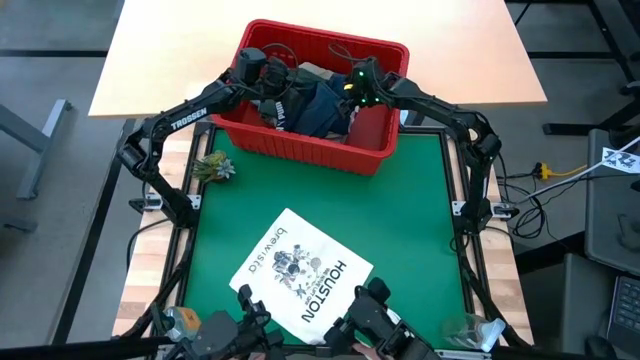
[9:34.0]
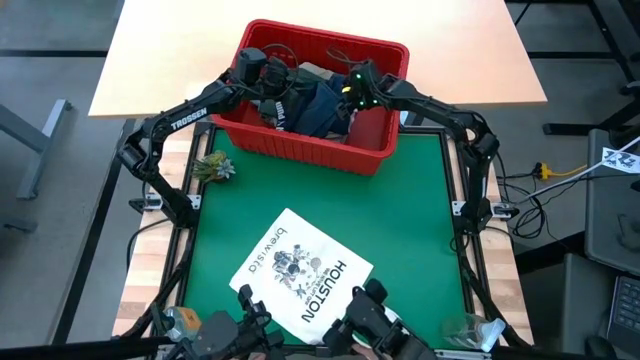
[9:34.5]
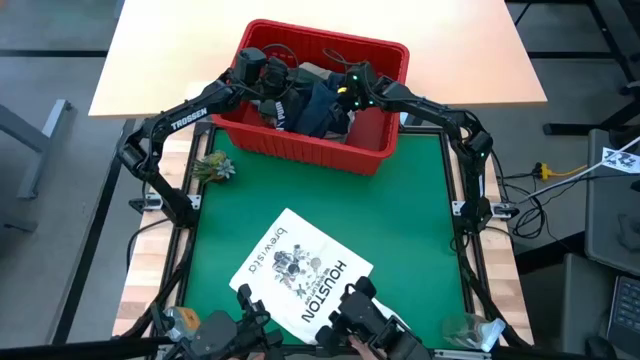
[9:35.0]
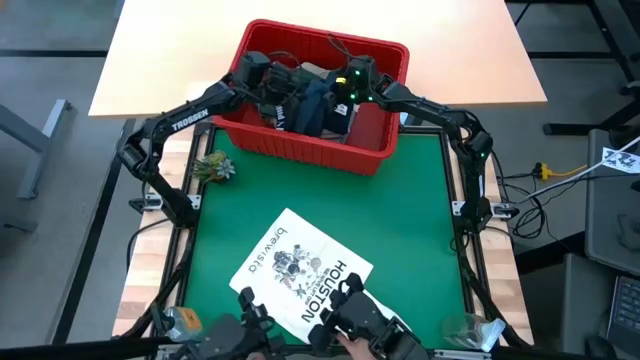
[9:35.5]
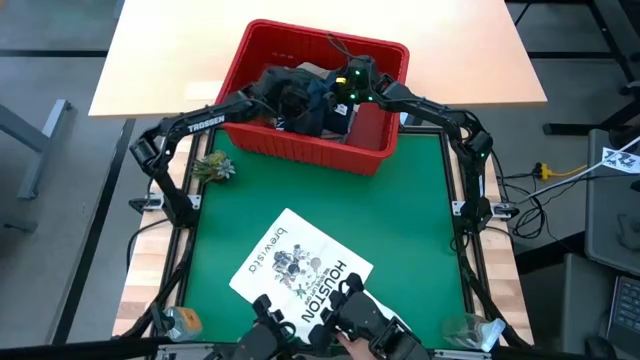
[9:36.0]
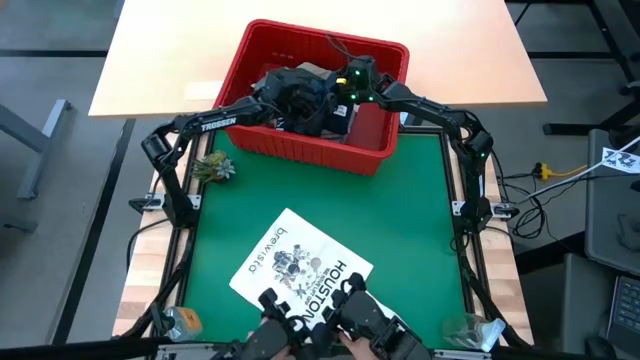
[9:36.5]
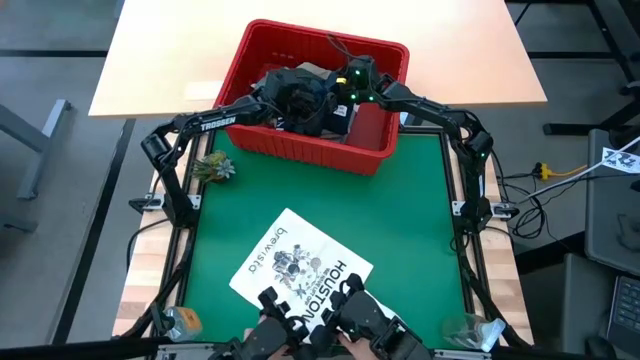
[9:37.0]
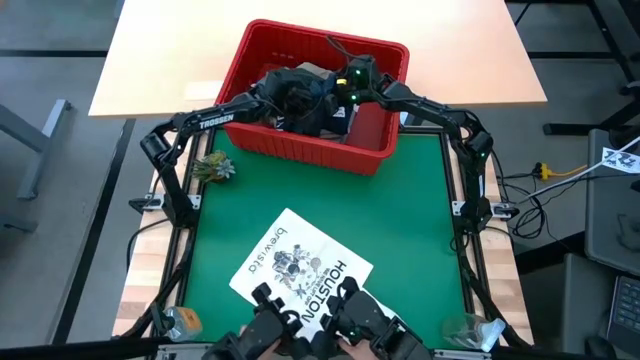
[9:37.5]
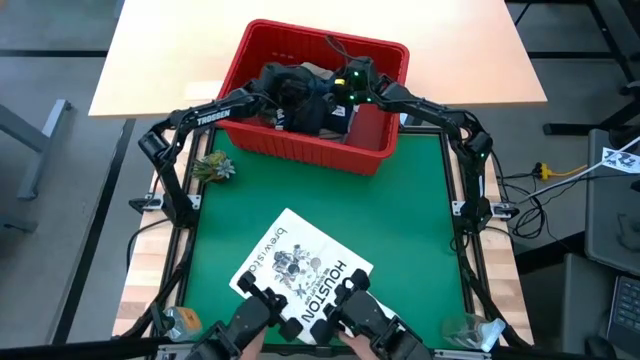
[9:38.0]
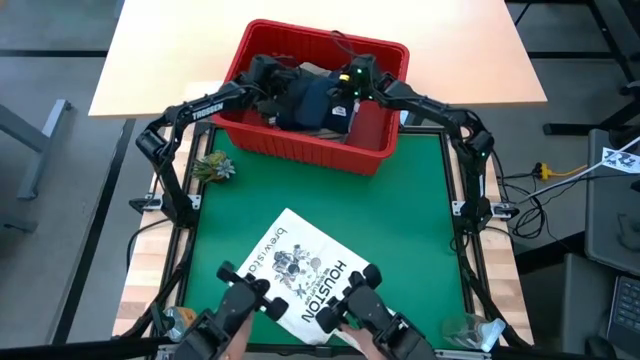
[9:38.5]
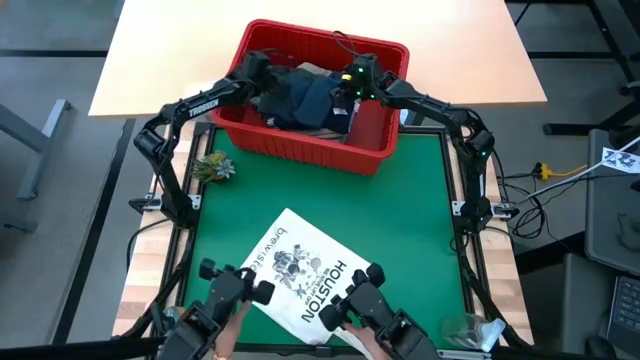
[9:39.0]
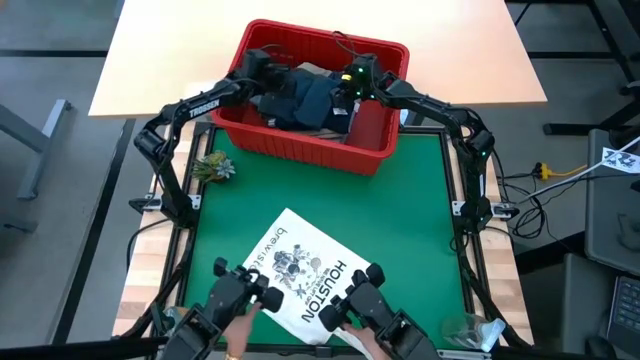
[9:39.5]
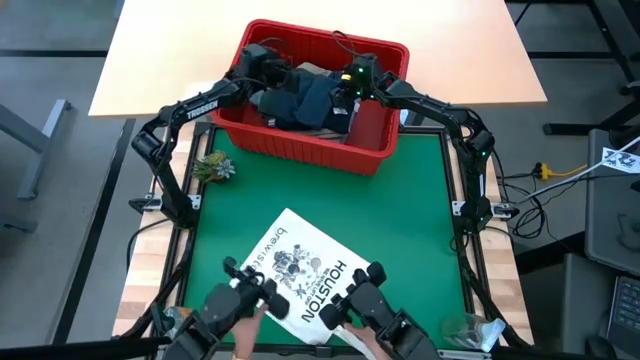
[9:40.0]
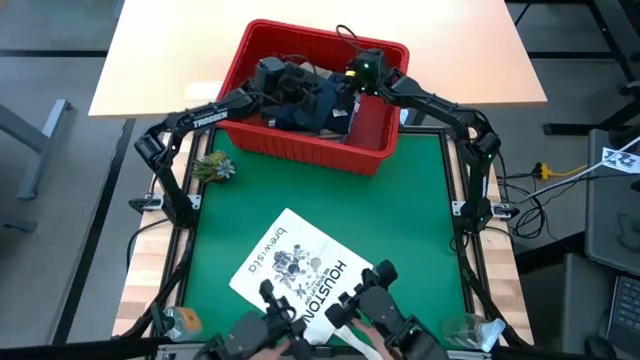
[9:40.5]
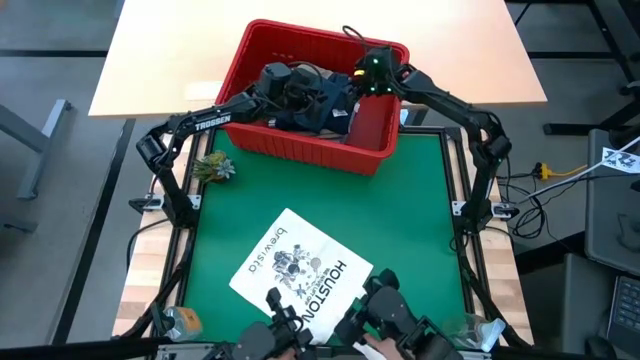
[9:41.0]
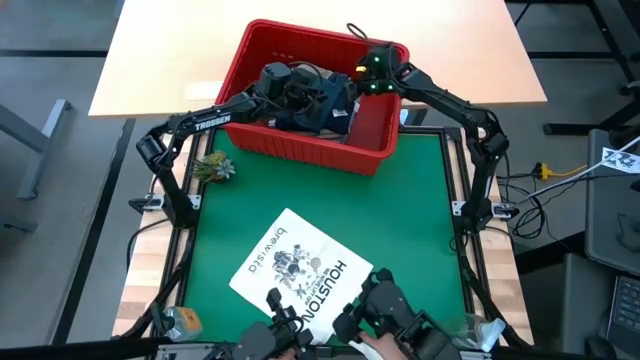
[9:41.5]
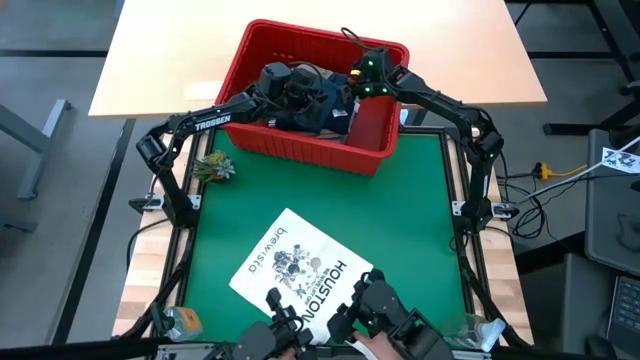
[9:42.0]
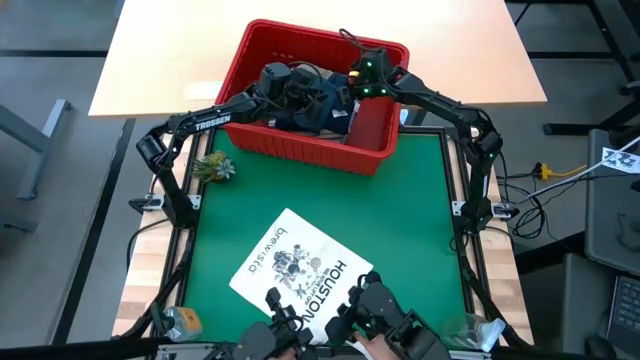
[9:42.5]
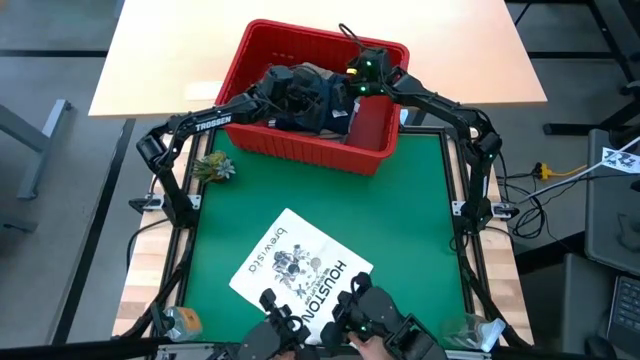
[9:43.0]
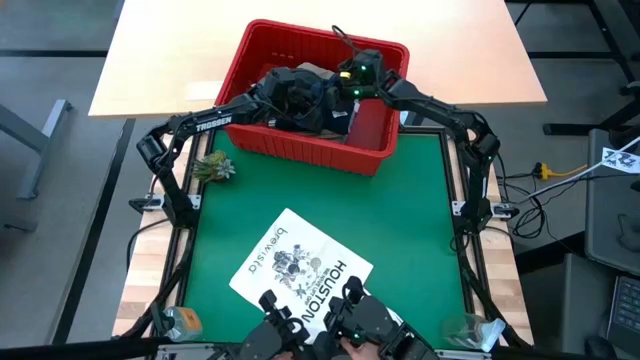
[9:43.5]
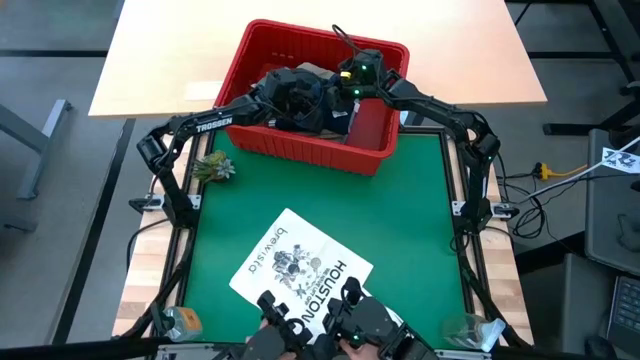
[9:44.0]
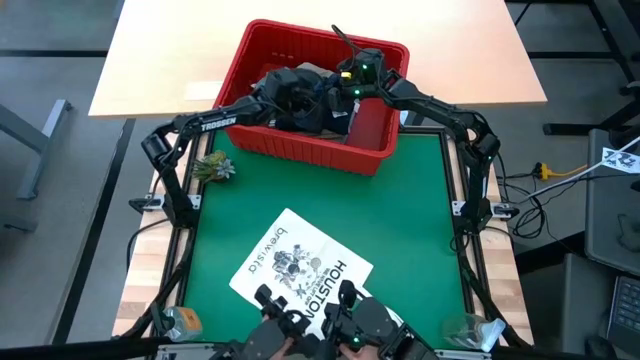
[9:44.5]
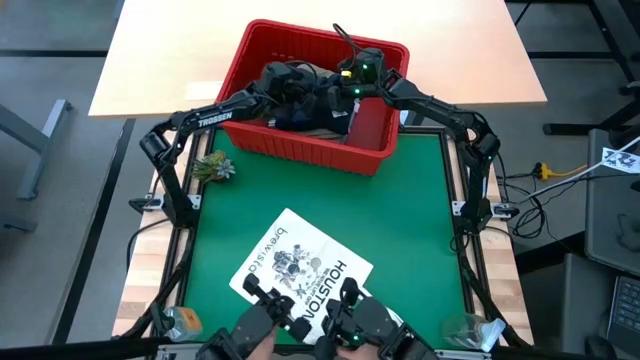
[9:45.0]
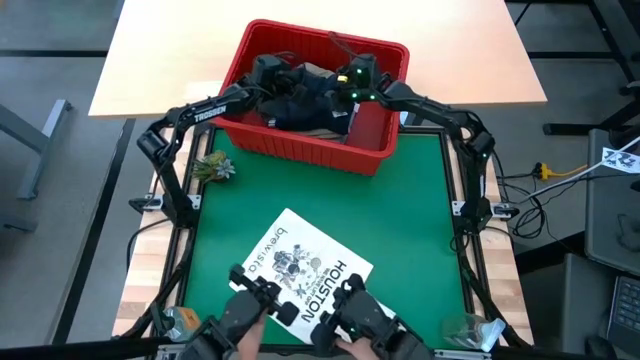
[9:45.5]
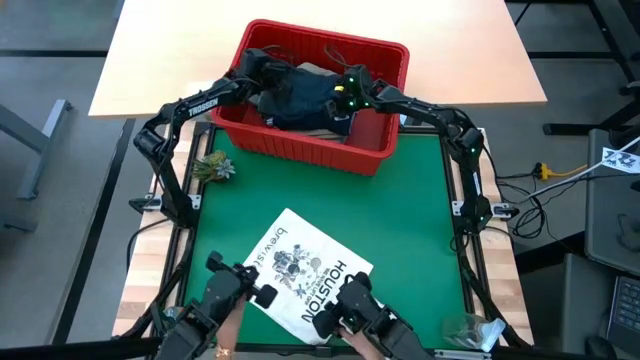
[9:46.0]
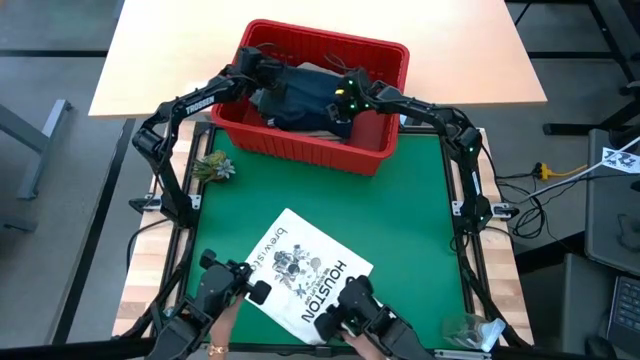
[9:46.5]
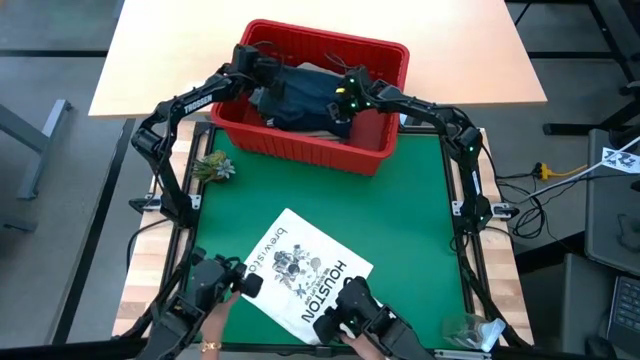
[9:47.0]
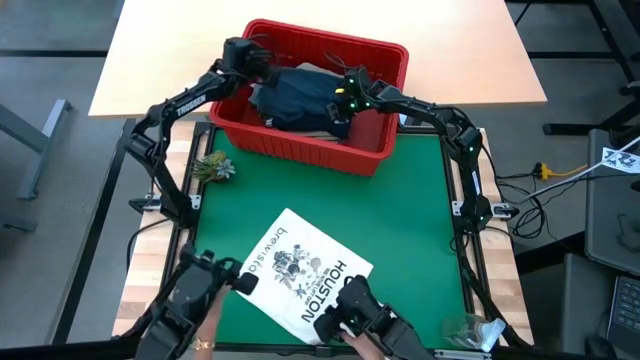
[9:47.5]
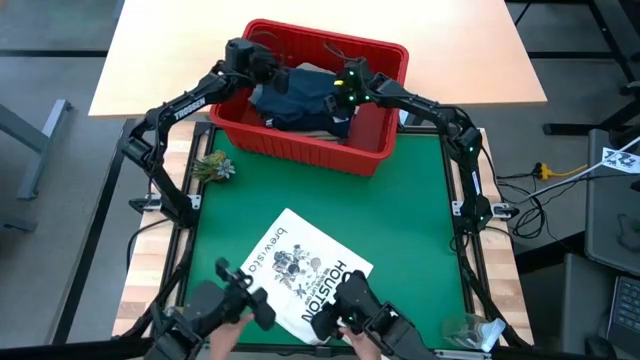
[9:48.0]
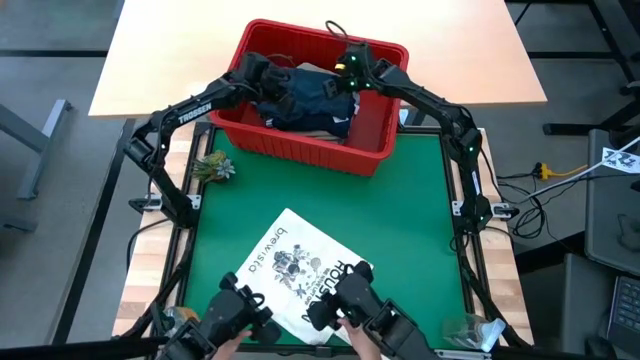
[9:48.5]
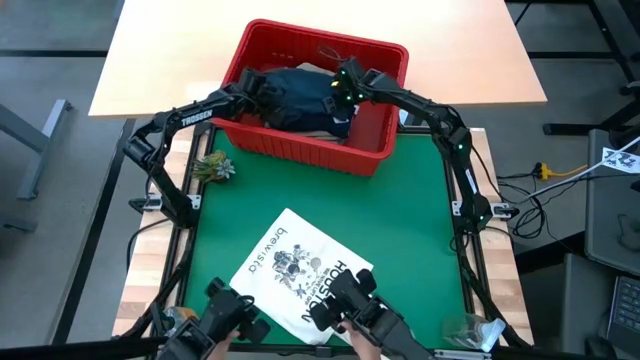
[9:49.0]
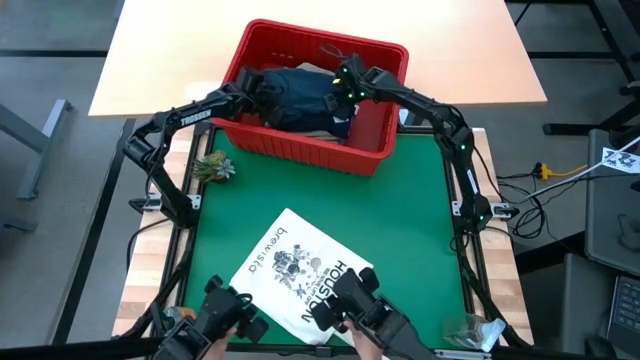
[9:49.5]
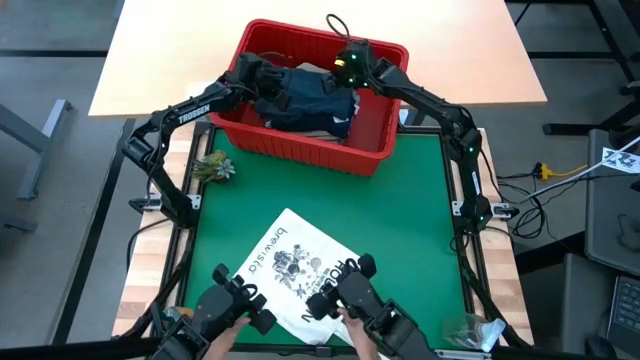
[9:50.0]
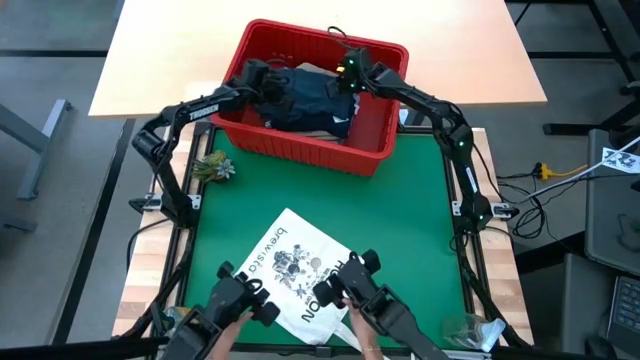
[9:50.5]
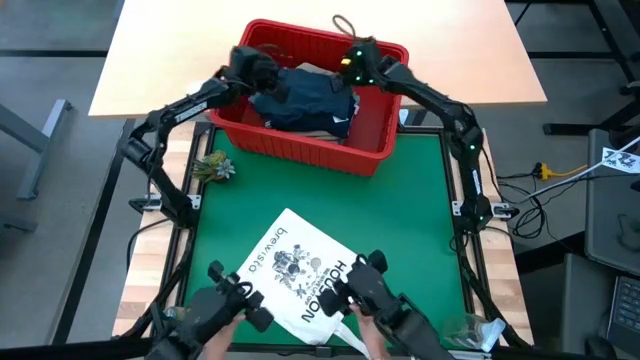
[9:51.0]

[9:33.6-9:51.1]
Task: Fold Laundry from Bin
Put the stacked clothes into the red organizer bin
